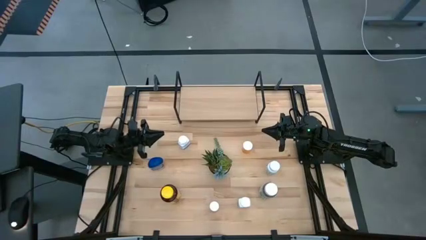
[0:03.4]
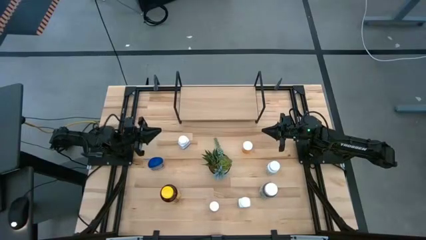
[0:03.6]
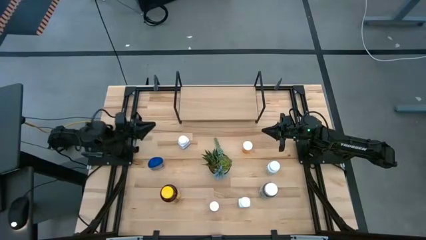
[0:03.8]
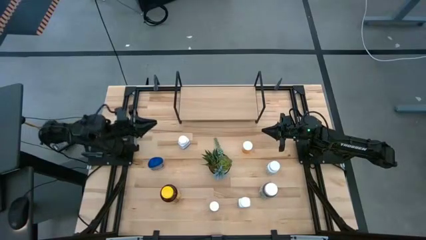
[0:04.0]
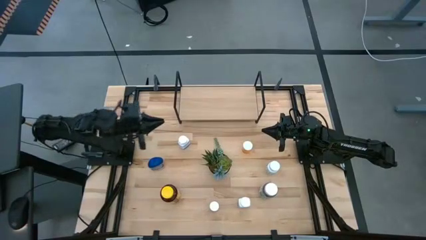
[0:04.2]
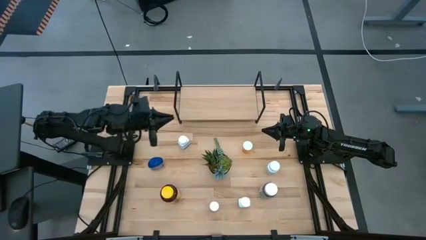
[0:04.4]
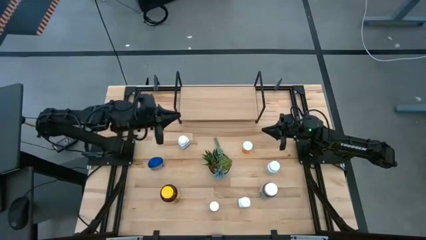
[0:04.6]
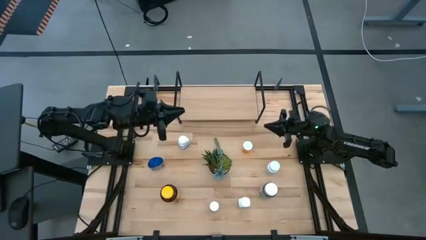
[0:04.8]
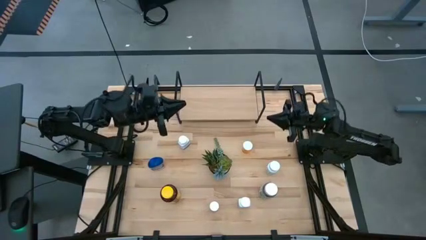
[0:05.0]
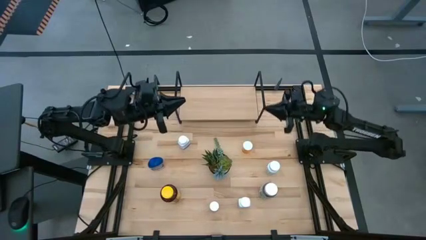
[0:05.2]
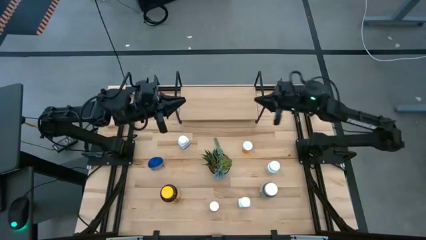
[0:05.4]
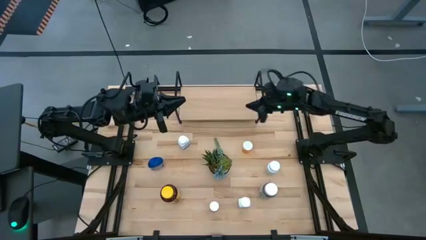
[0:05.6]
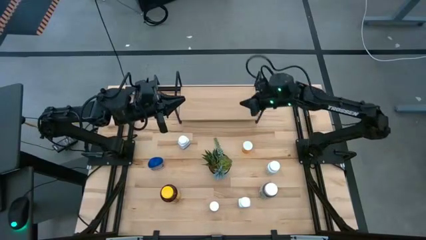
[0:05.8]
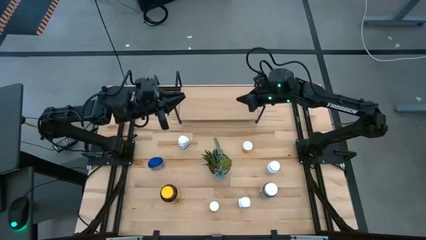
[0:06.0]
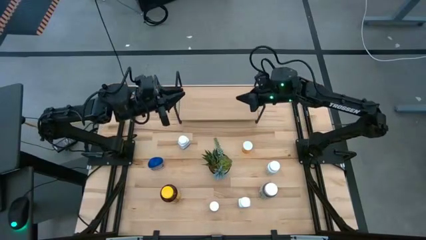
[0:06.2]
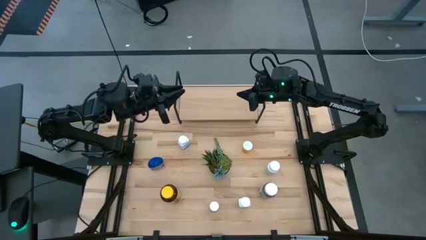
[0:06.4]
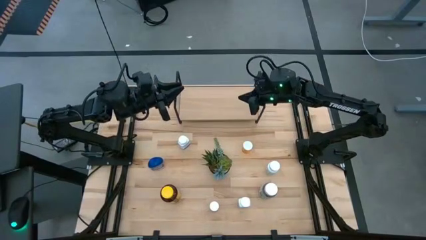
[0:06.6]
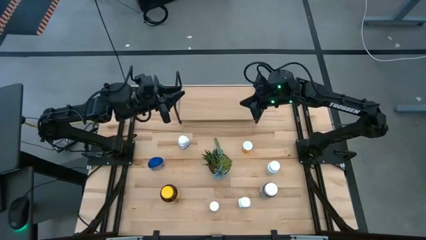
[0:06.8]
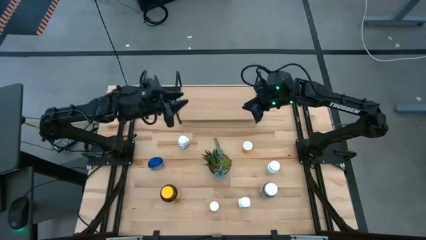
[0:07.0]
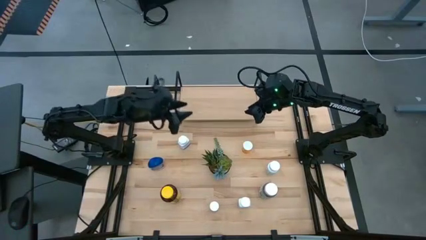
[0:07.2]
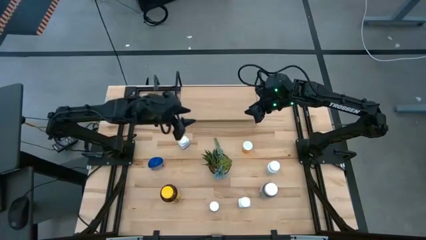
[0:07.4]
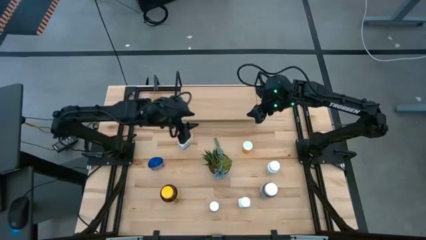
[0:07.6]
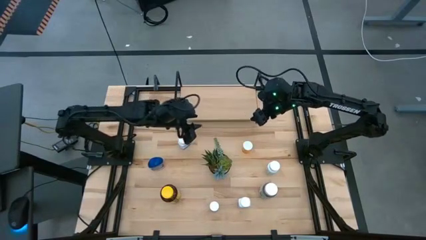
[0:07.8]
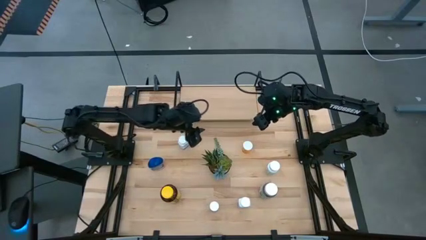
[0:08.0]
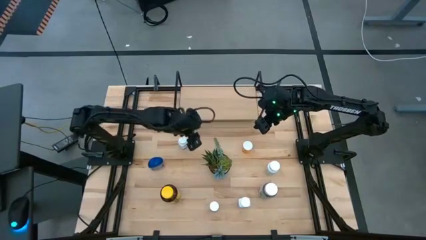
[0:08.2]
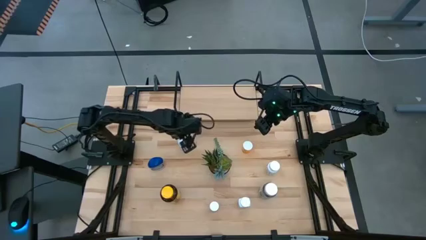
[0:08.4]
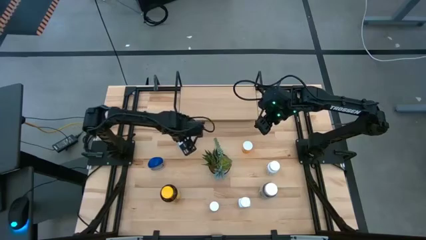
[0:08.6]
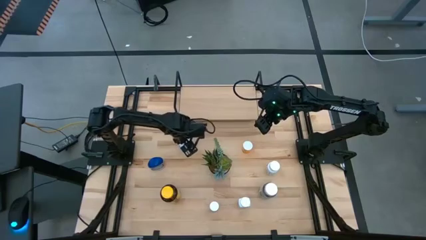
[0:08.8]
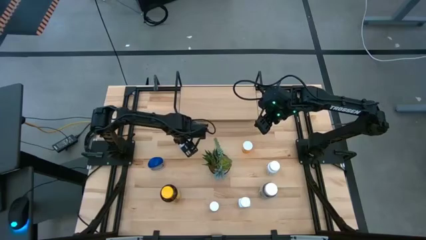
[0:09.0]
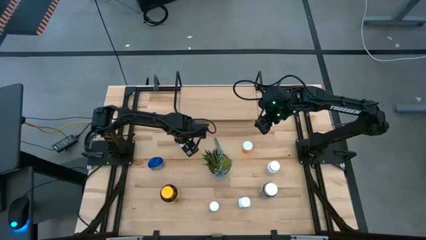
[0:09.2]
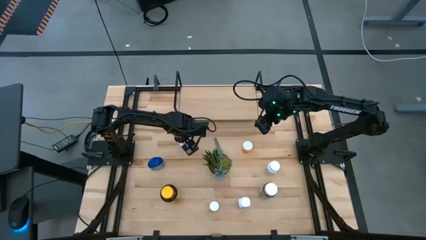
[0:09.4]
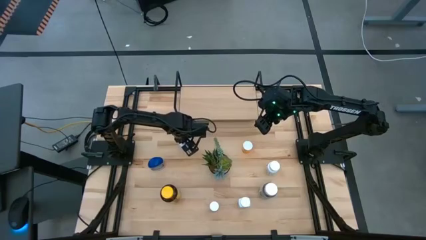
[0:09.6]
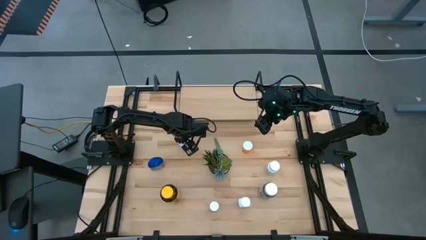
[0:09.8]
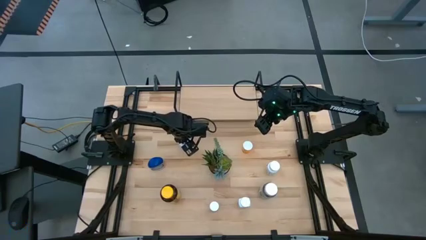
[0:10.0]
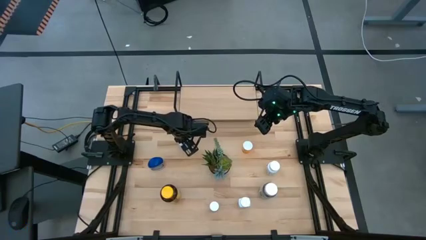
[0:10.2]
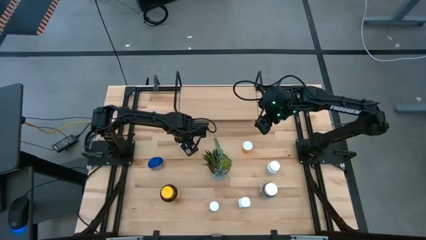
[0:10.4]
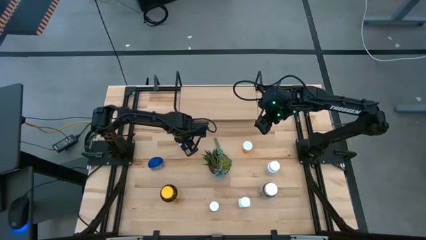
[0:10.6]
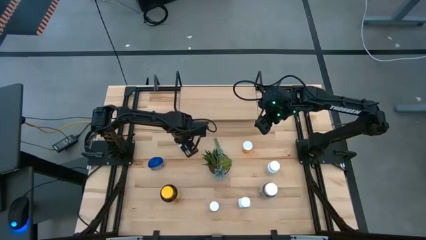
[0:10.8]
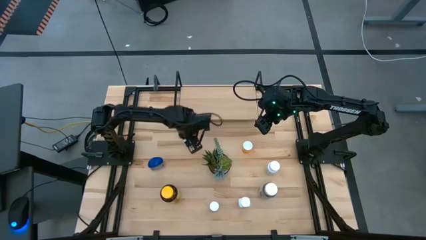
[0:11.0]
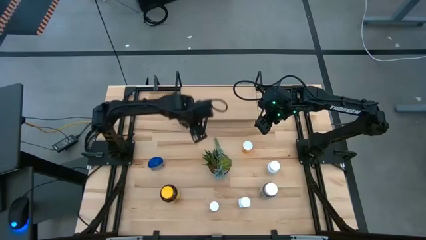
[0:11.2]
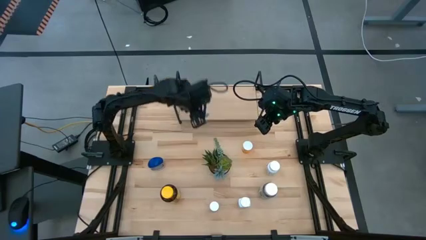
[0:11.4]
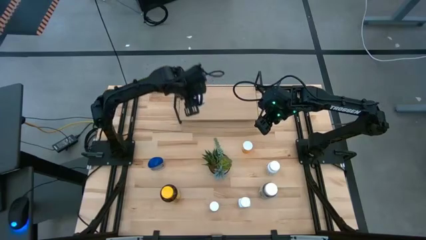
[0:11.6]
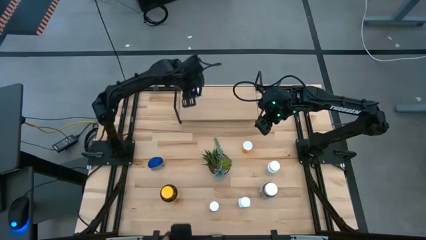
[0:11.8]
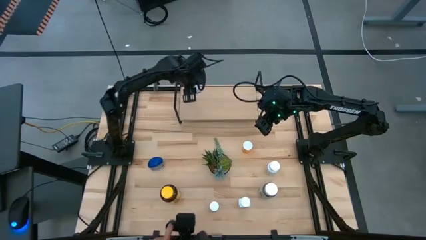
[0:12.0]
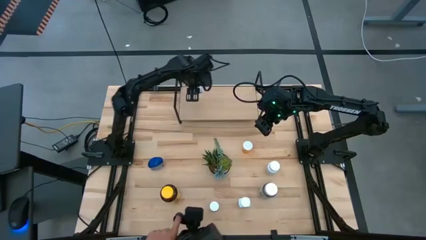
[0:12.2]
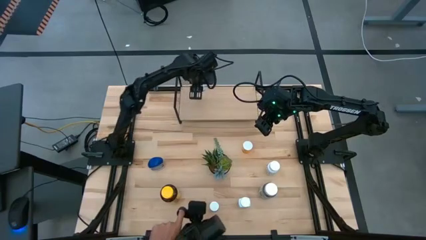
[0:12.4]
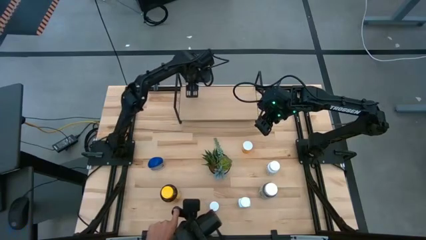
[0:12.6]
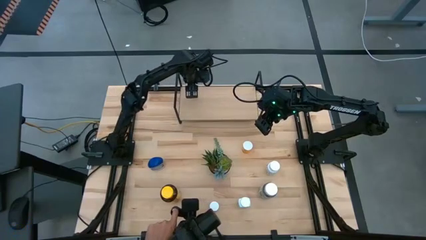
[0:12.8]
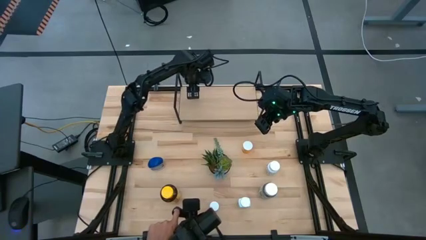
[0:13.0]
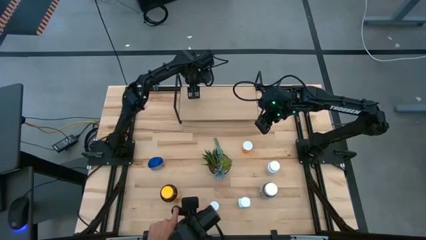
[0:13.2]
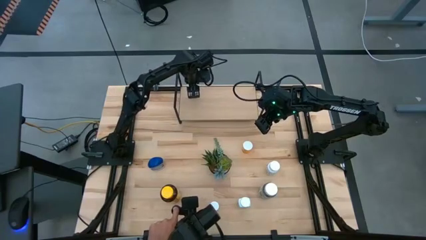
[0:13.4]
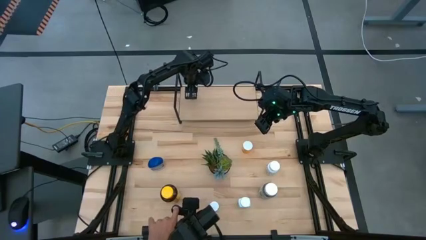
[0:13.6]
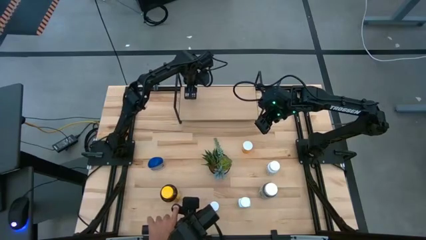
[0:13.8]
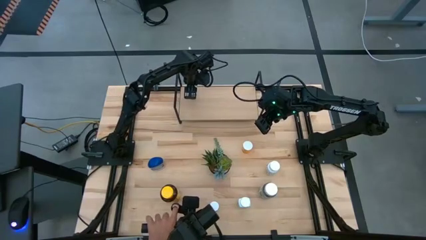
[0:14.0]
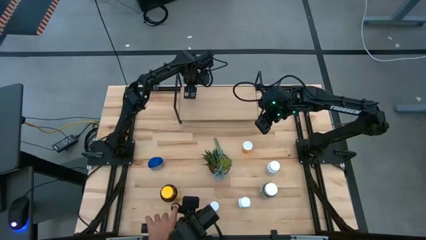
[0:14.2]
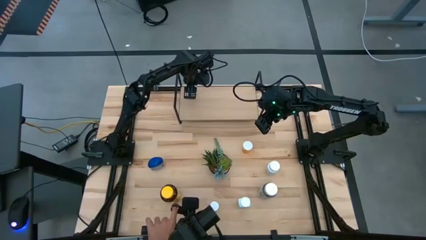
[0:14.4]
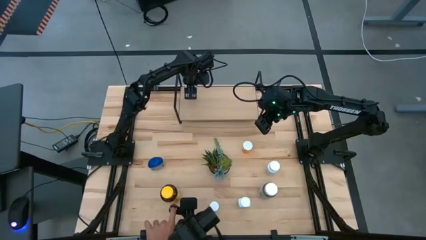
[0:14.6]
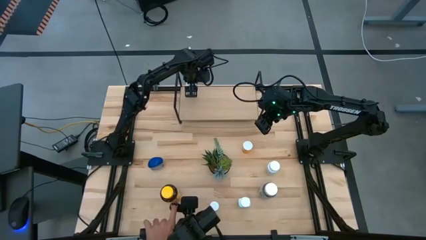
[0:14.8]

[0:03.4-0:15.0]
Task: Pick and place medicine bottles onto shelf by color
Put the top white pill bottle on the shelf
